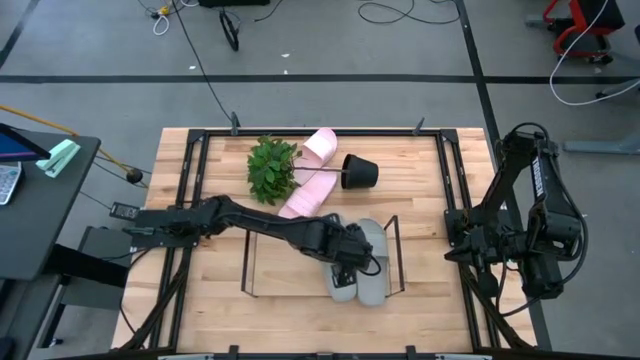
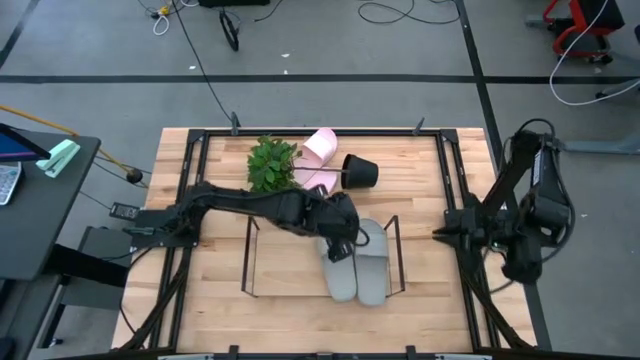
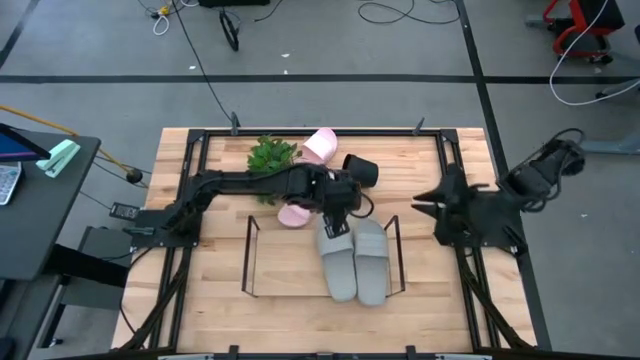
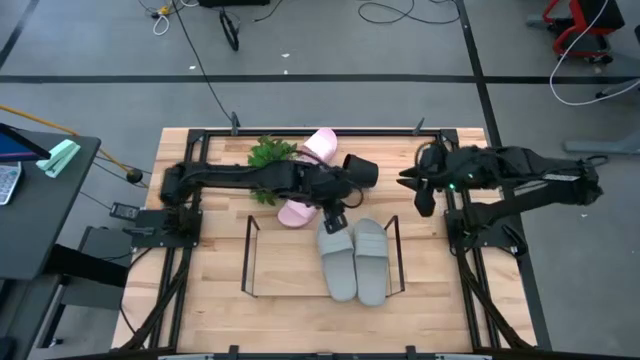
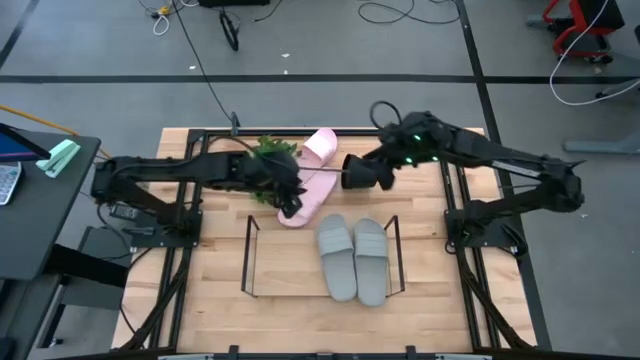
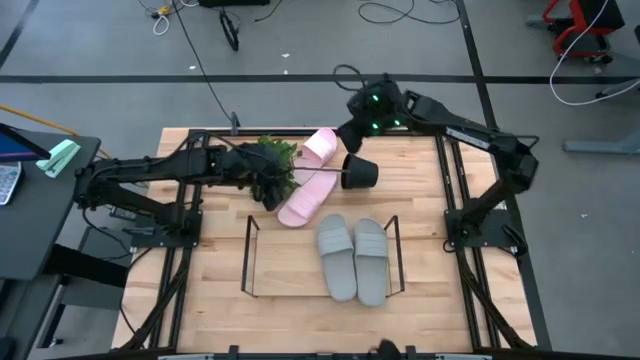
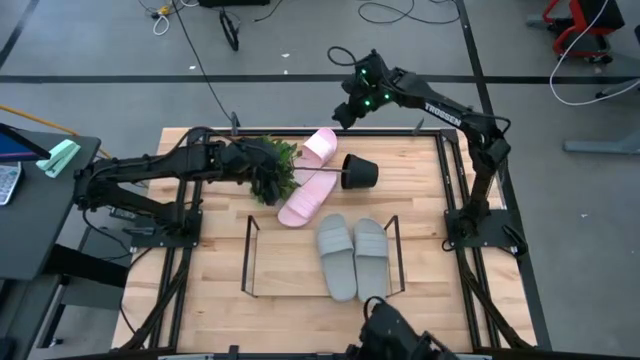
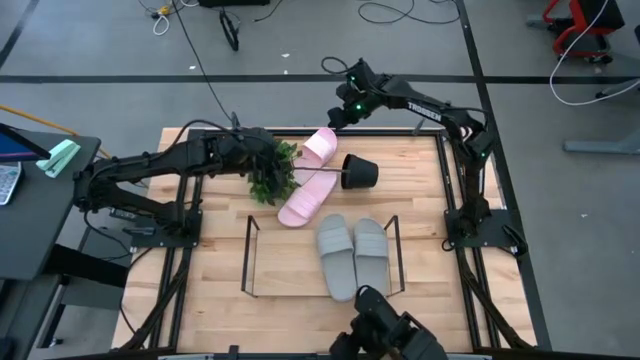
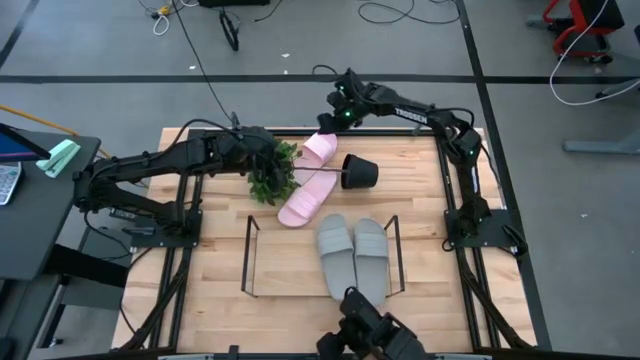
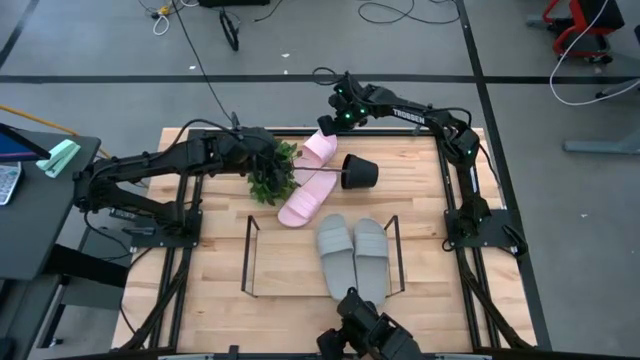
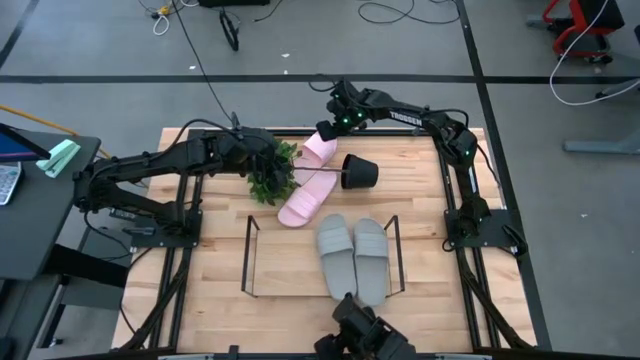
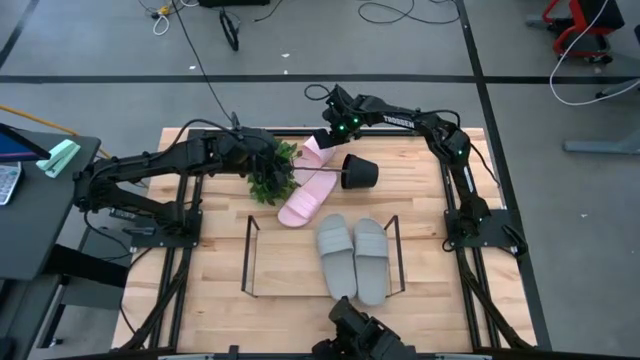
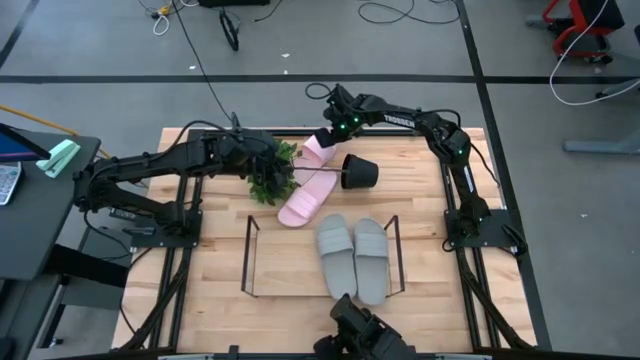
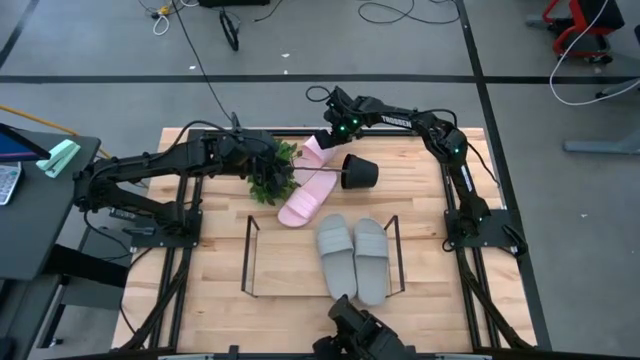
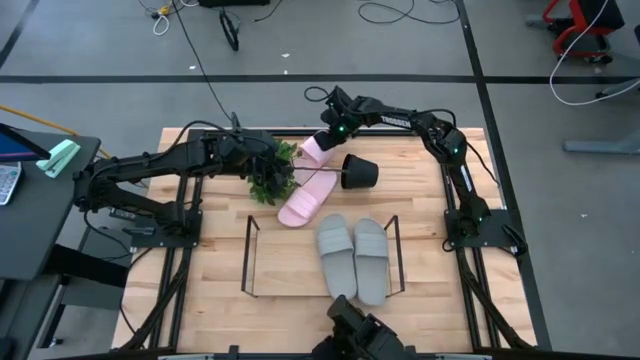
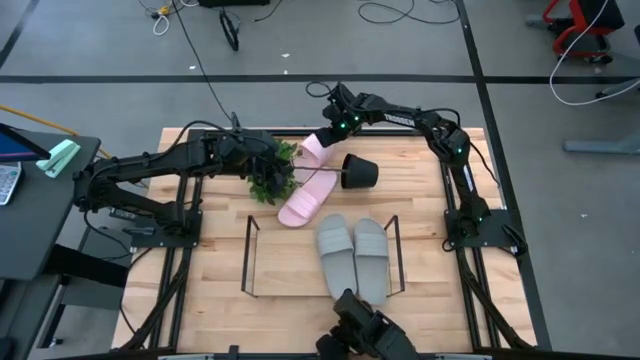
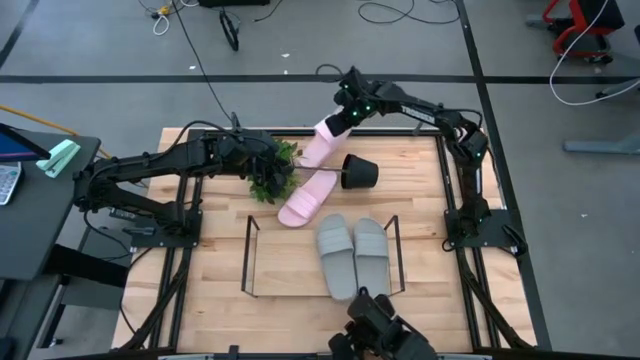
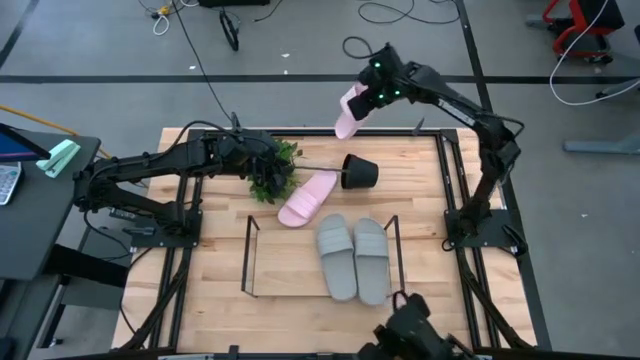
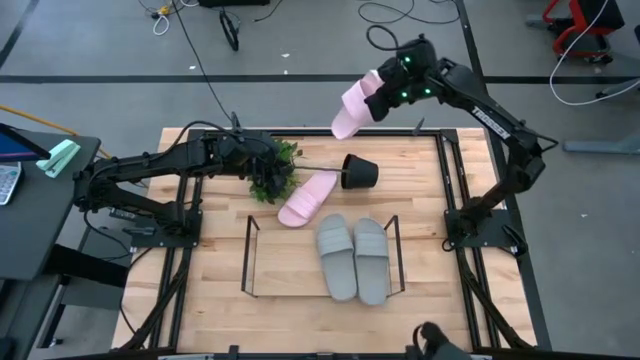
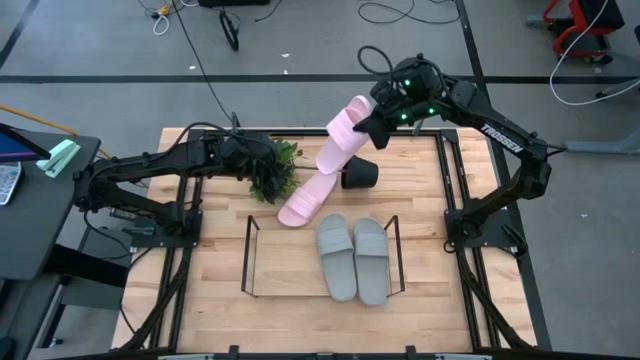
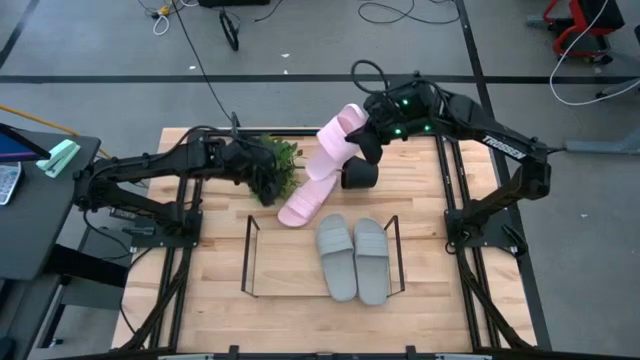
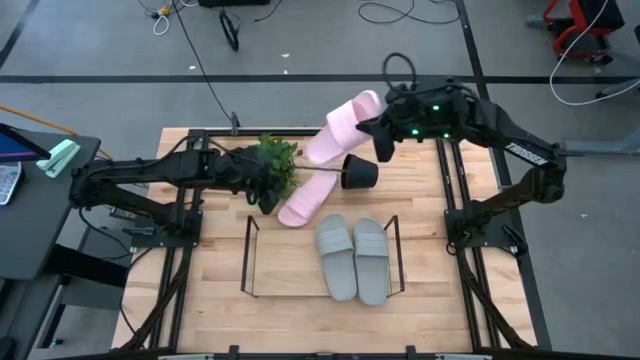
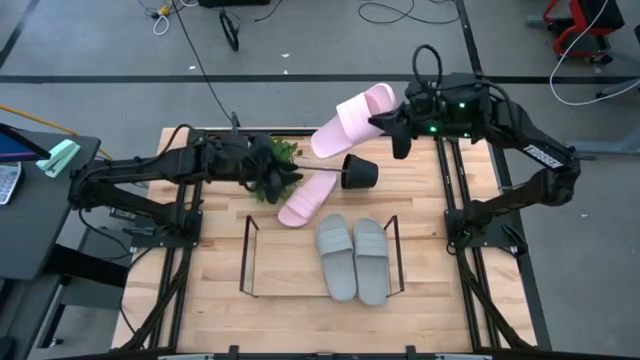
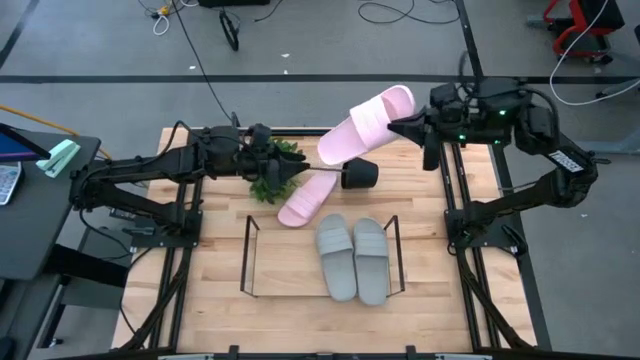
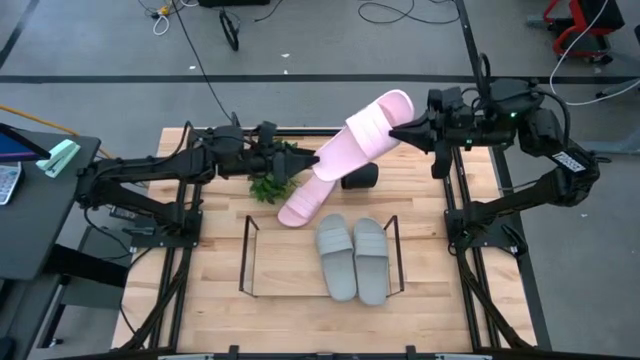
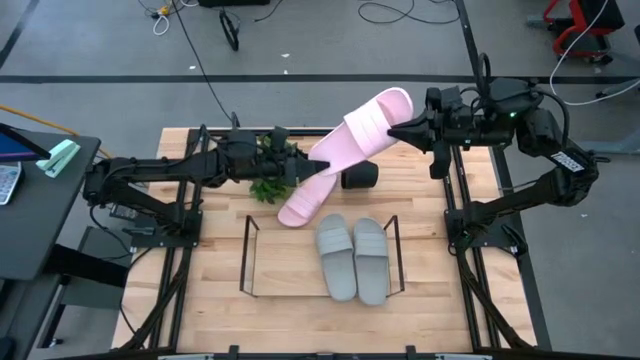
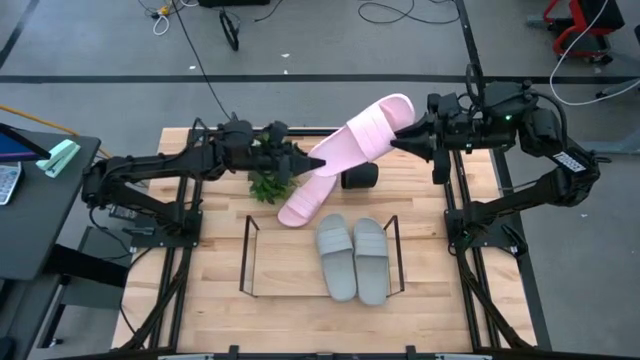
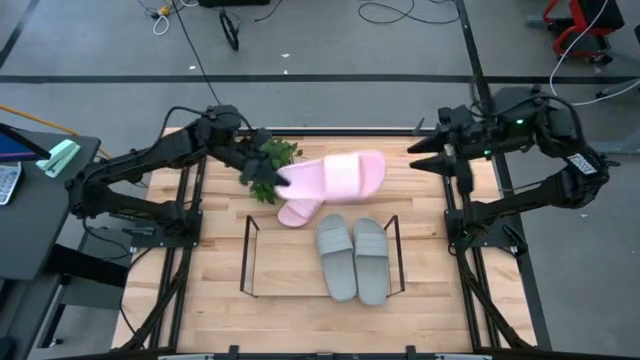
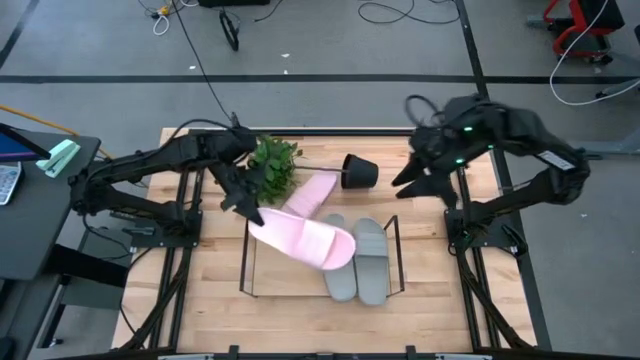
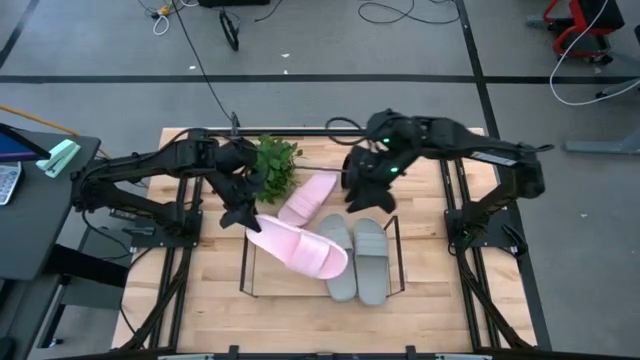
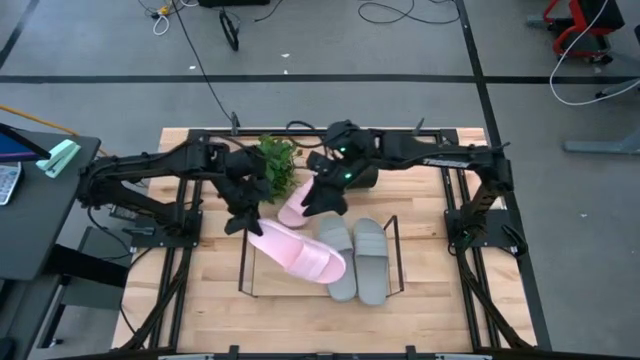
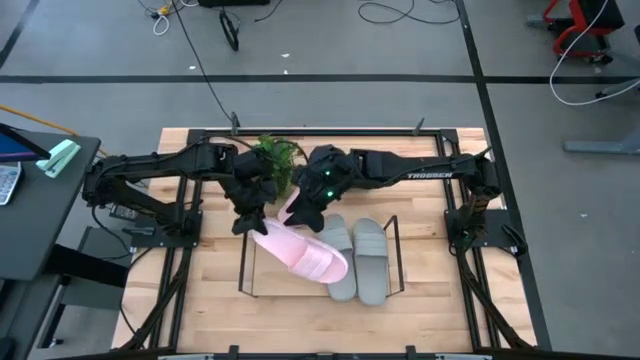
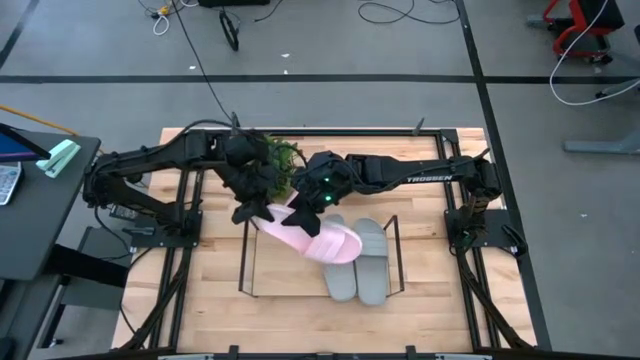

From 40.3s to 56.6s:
Task: Pick and place slides into the shelf
Put the top pink slipper on the shelf

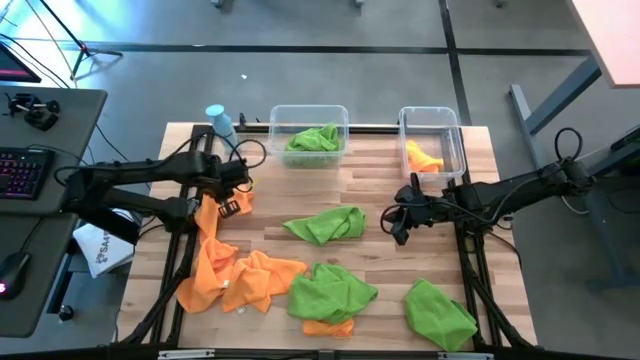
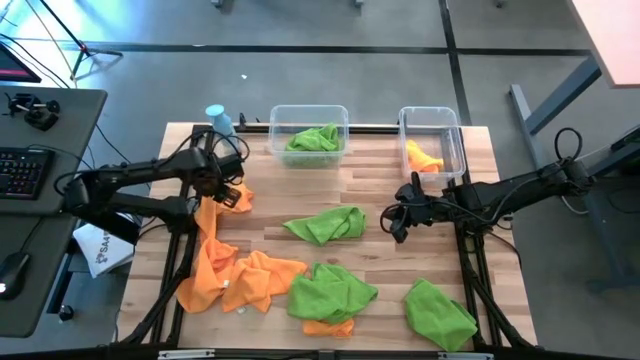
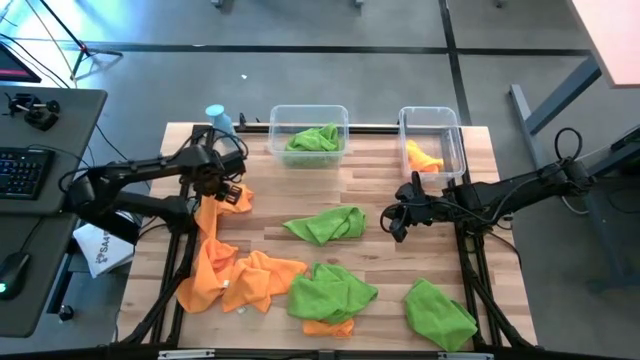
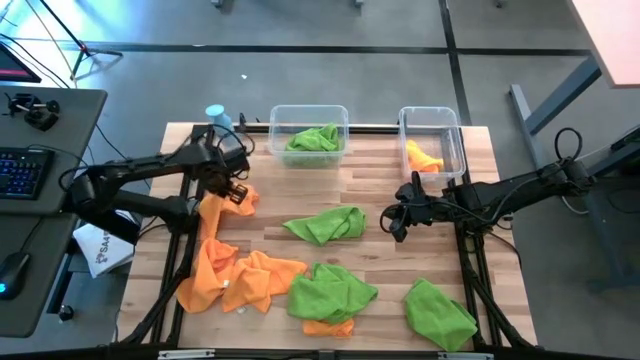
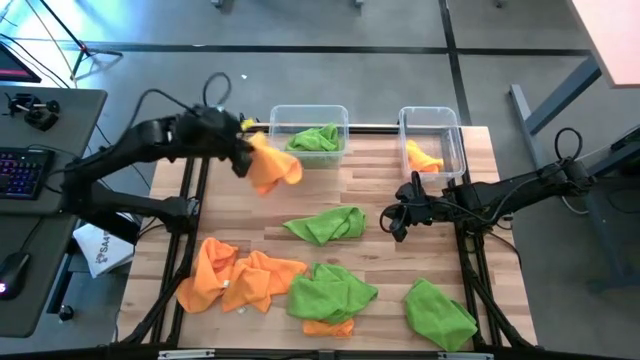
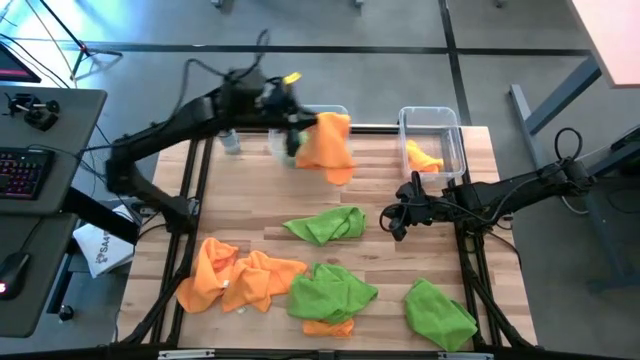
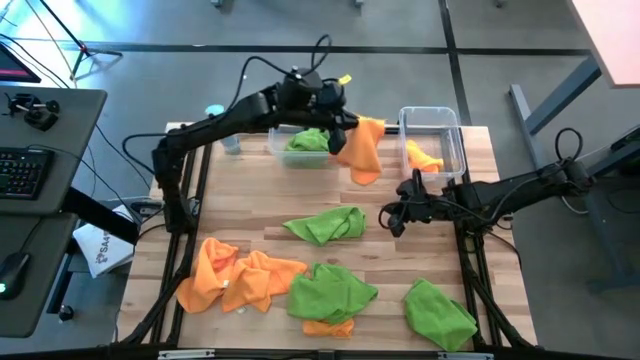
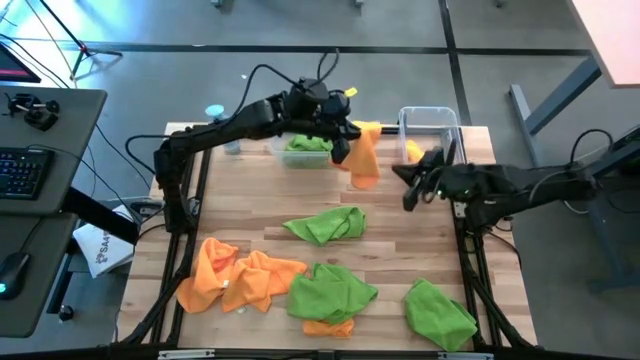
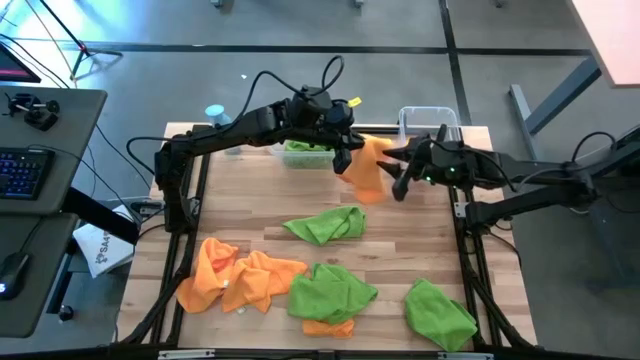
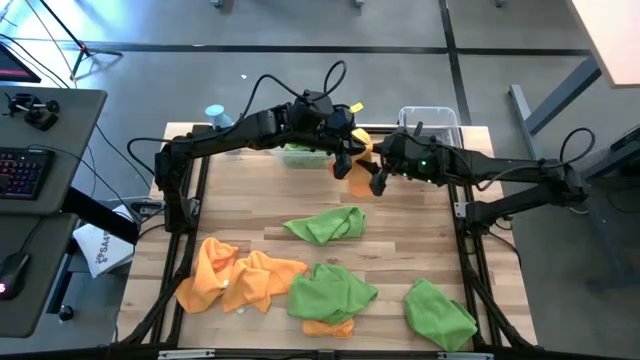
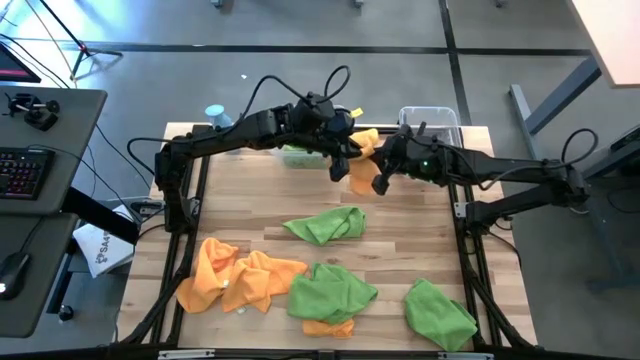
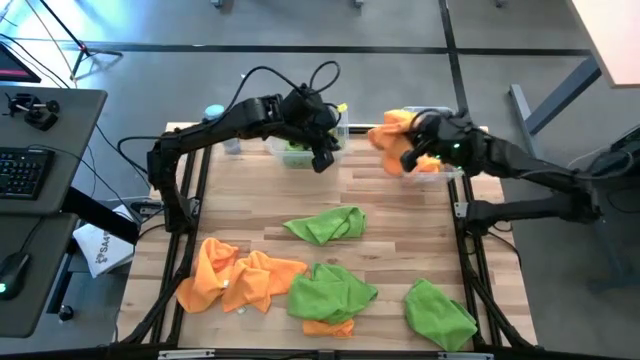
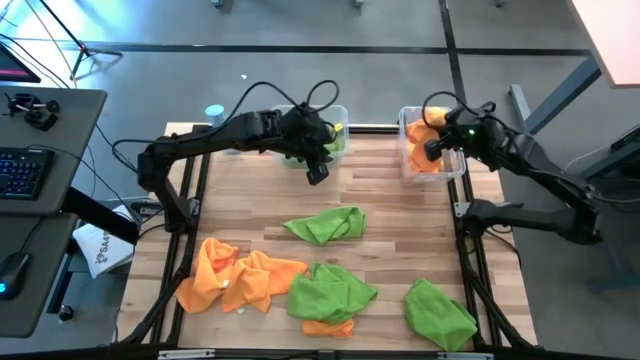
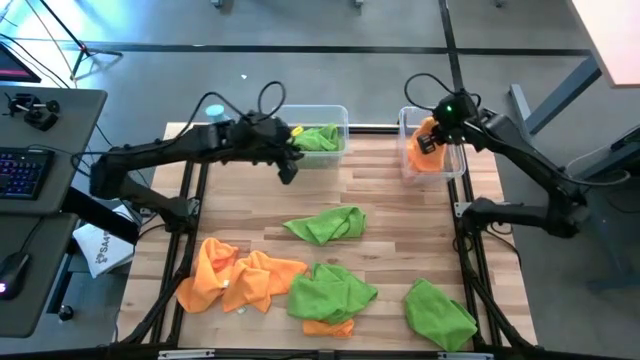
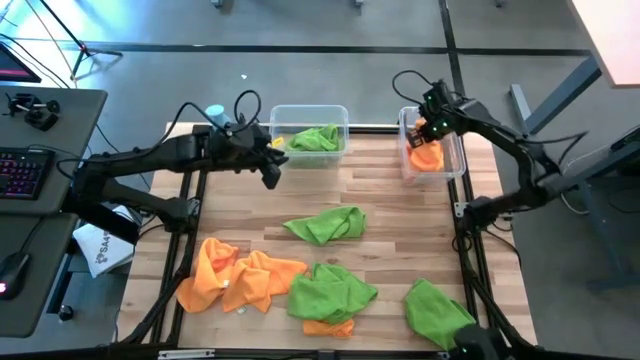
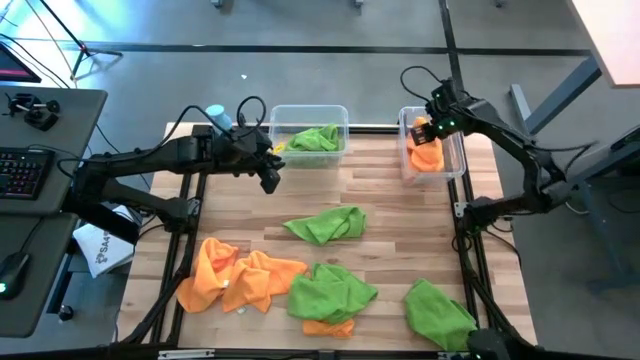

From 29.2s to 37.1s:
Task: Sort microfiber towel by color & place in baskets
Put the orange towel into the right transparent bin
